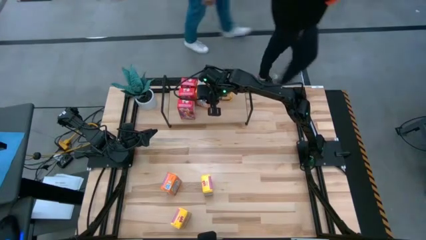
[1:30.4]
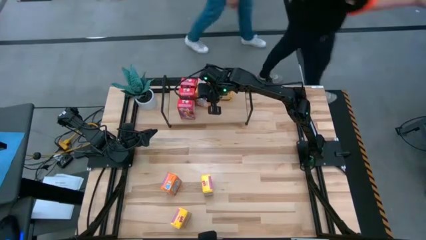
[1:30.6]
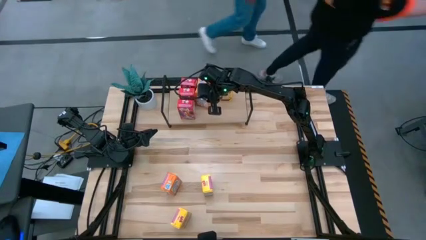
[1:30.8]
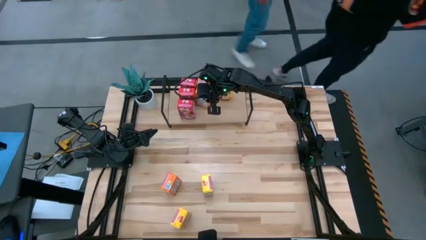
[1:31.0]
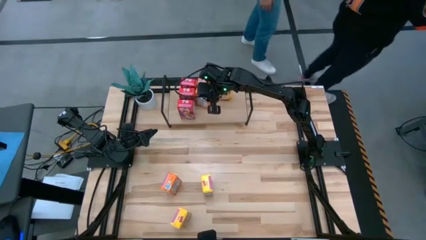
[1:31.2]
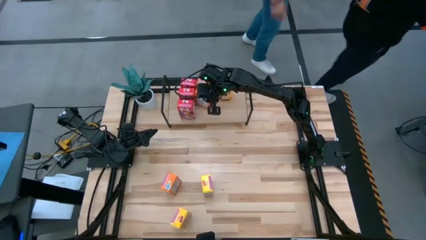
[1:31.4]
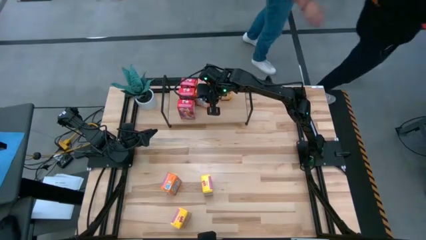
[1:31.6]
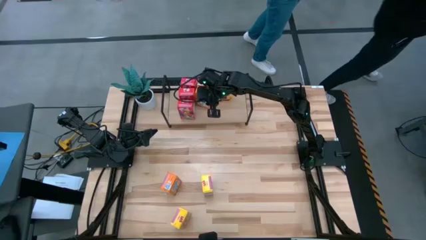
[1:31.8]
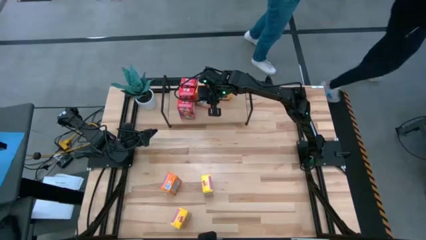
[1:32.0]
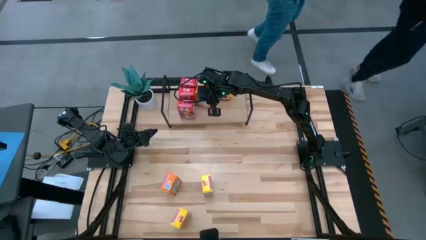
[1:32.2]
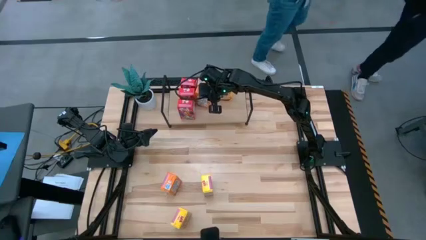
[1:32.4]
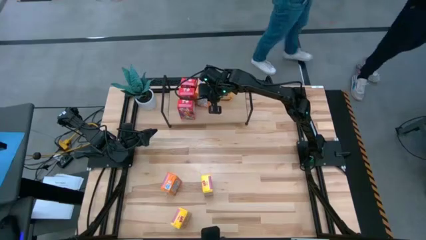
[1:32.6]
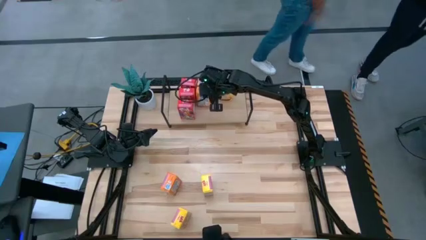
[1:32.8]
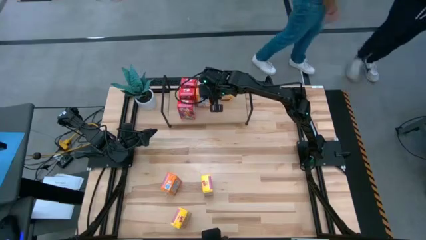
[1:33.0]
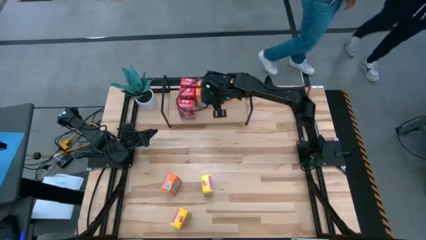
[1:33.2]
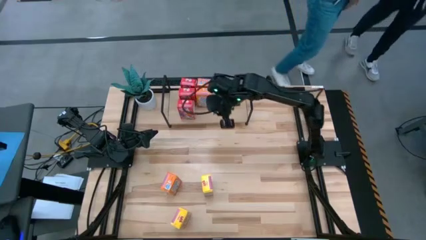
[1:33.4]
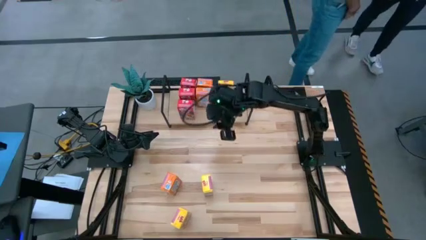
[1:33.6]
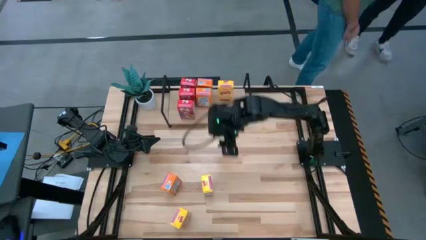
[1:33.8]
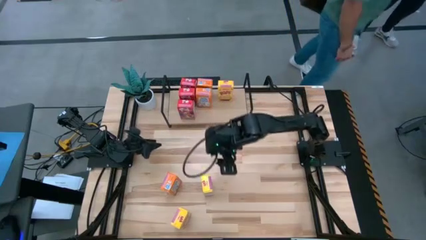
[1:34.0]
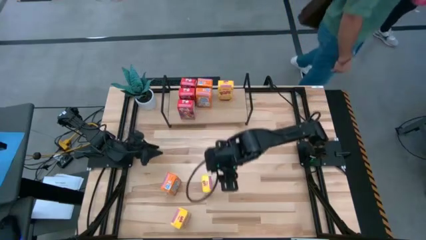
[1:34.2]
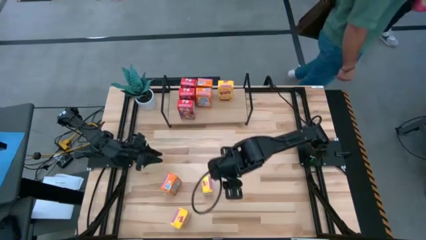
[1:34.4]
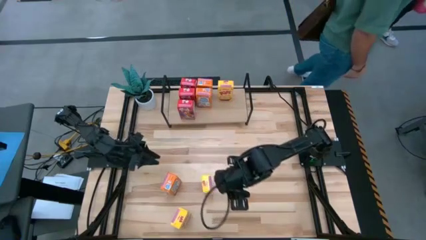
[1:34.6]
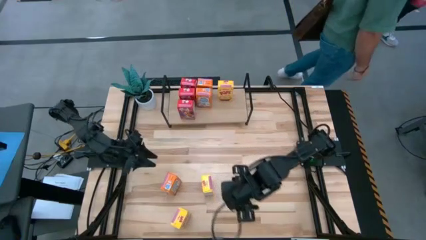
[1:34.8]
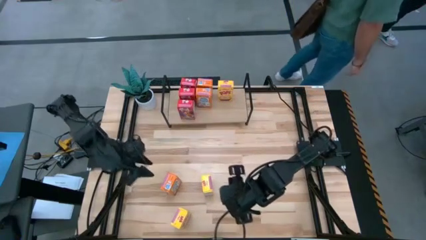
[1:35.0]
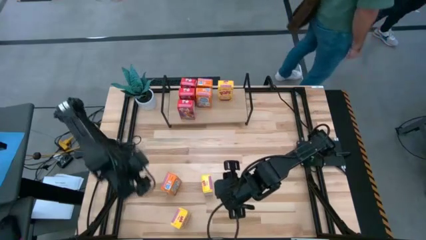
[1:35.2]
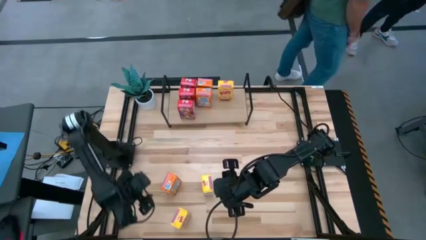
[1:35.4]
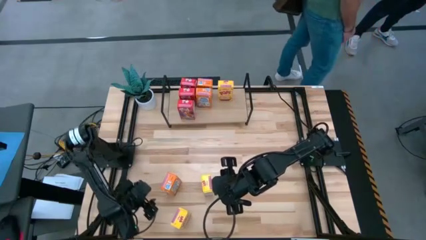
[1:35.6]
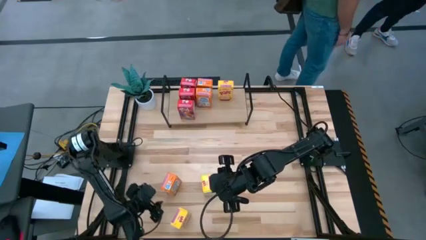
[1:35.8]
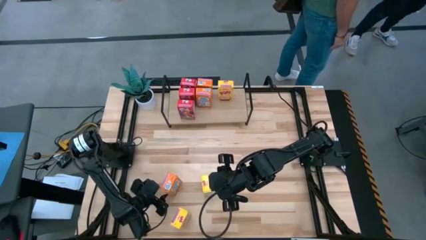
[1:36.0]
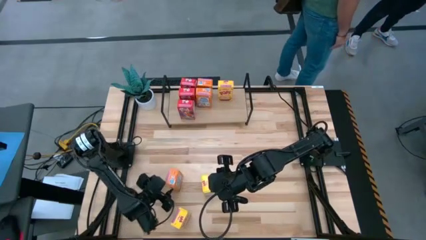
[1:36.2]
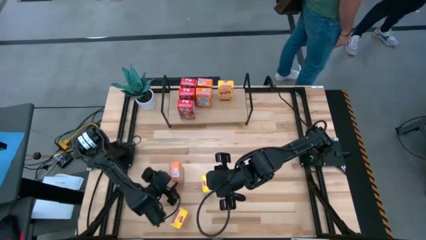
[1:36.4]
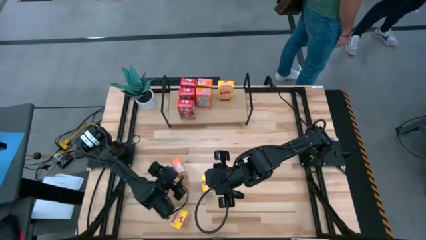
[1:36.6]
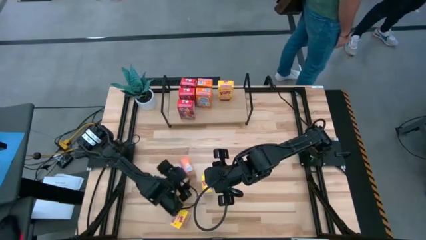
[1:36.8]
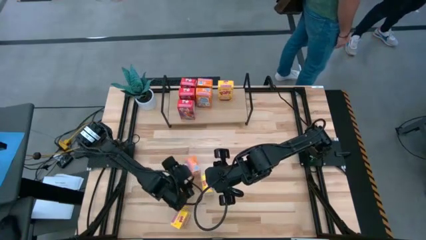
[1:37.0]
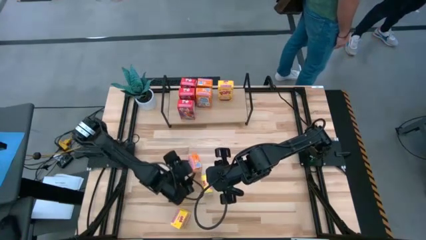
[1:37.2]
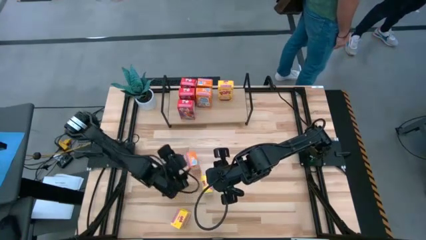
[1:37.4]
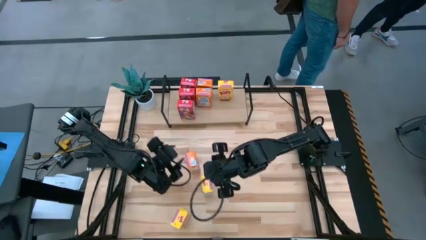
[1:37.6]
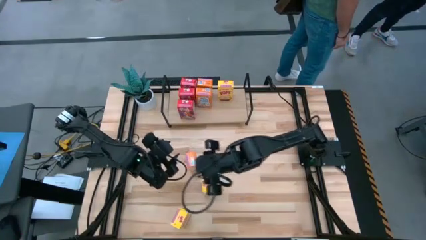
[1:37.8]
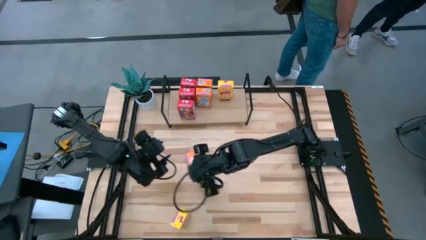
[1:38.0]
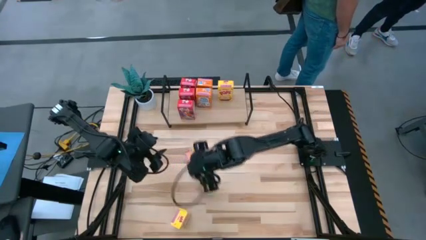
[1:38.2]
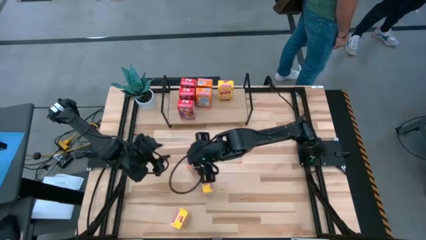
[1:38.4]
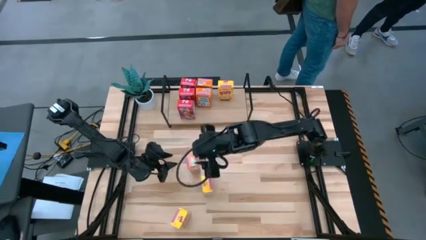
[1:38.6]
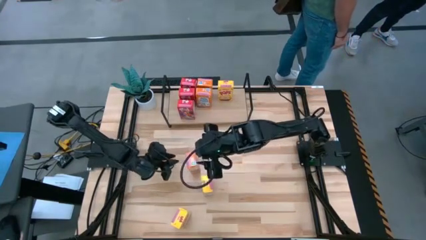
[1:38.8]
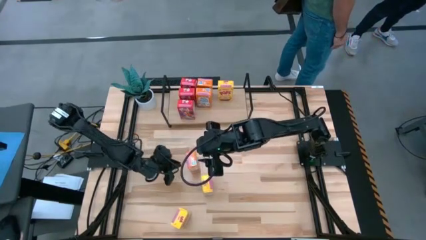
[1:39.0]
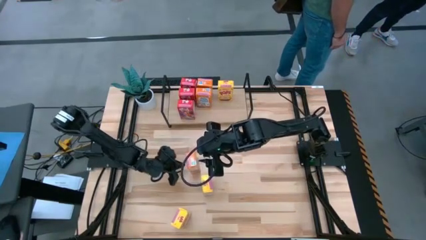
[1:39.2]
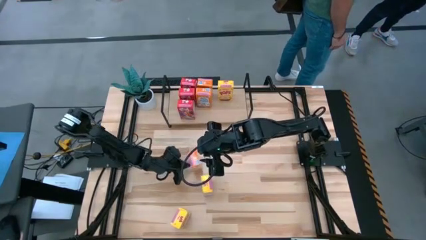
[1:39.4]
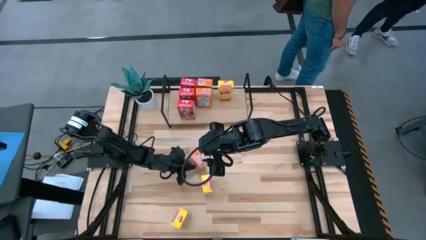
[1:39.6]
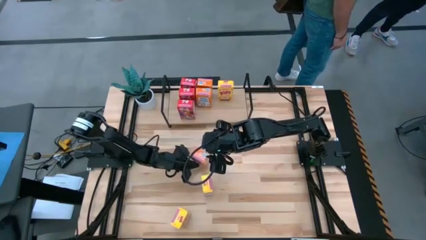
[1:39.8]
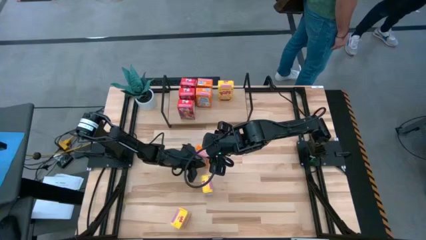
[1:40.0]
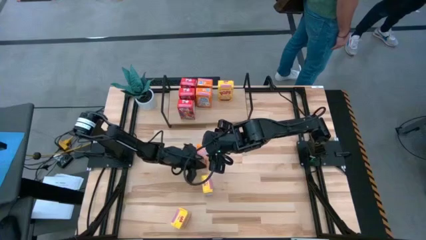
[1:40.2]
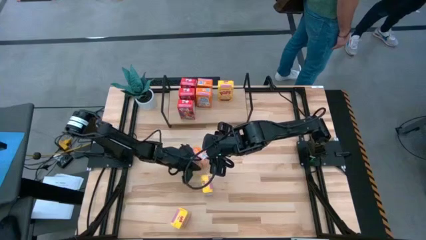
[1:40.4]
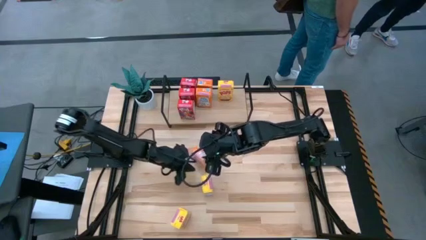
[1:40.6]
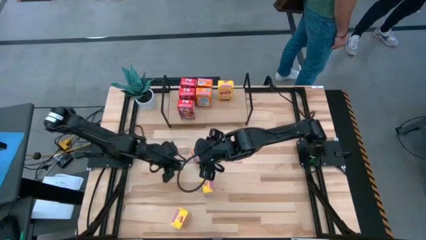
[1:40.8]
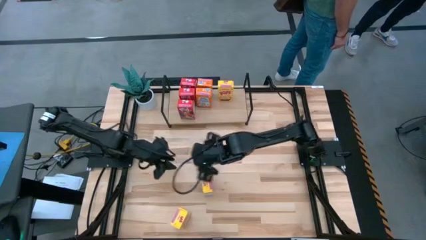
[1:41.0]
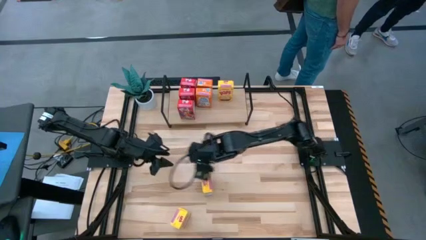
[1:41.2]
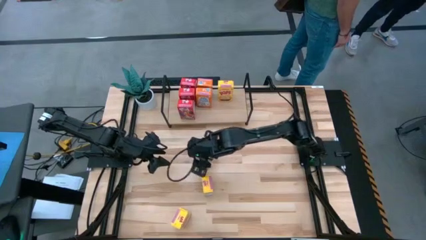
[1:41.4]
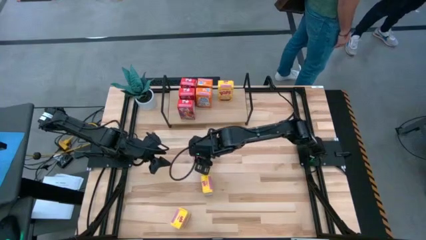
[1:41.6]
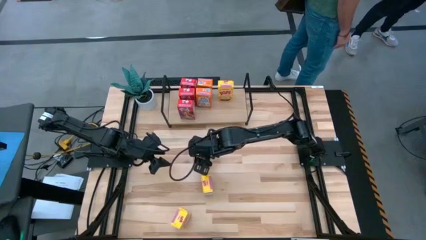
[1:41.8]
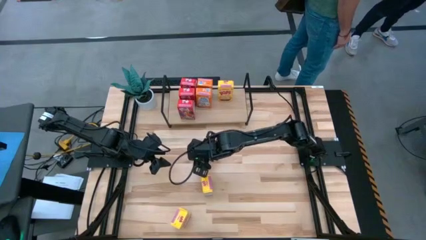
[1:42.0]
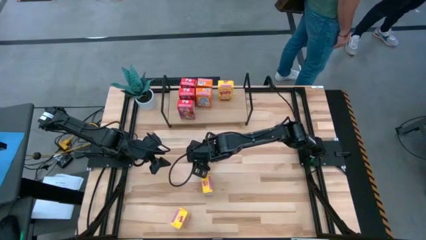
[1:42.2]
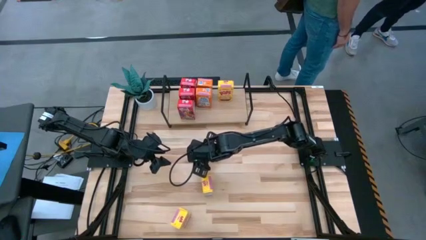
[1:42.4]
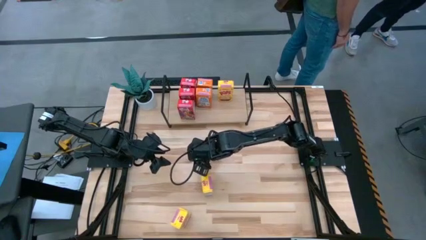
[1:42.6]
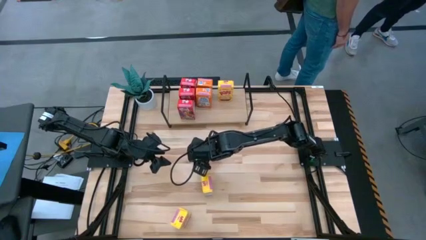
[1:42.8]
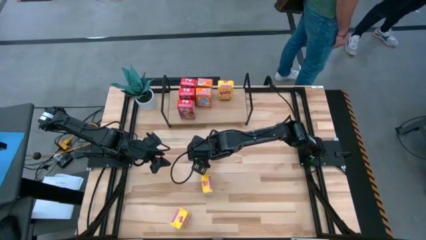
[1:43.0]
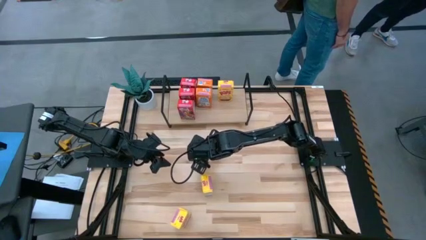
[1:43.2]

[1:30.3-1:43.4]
Task: Stack cereal on shelf
Put the orange cereal box on the shelf aligned with the other orange cereal boxes
